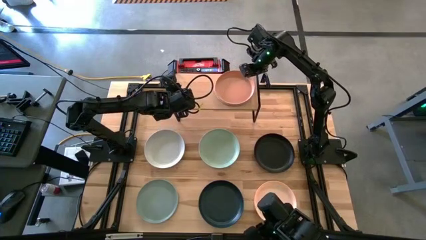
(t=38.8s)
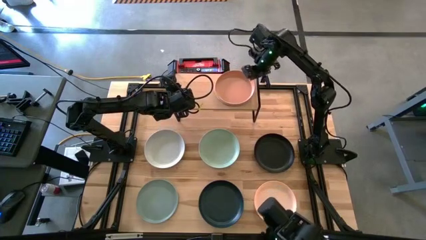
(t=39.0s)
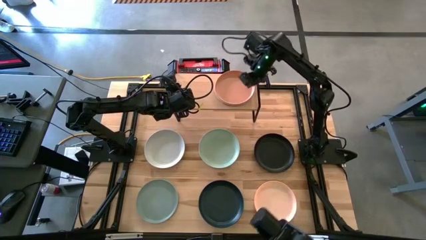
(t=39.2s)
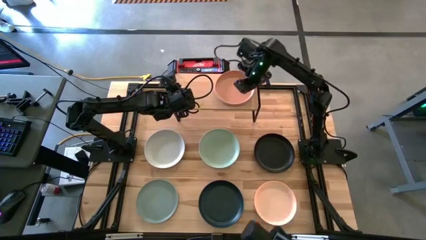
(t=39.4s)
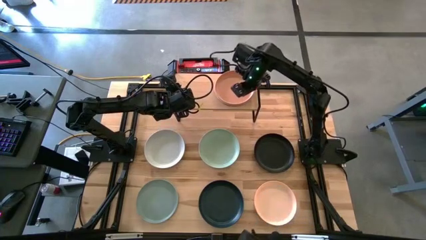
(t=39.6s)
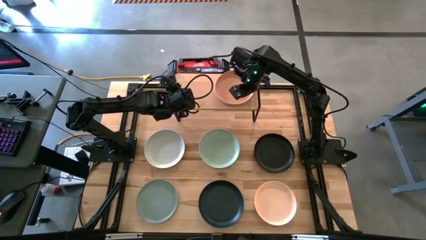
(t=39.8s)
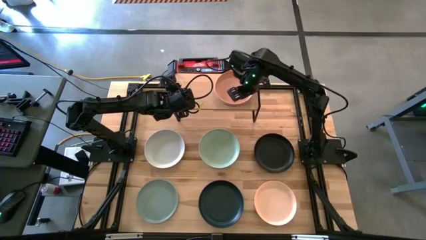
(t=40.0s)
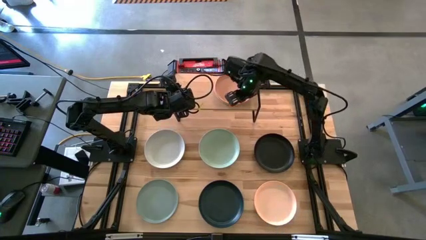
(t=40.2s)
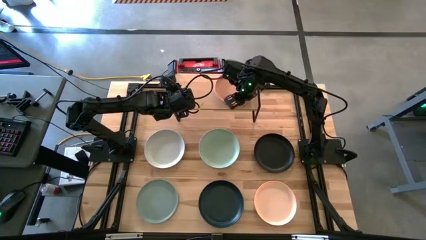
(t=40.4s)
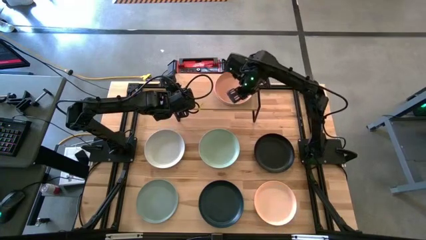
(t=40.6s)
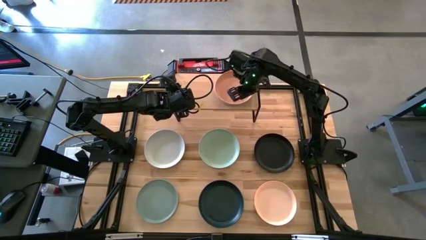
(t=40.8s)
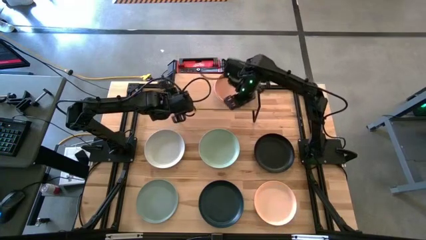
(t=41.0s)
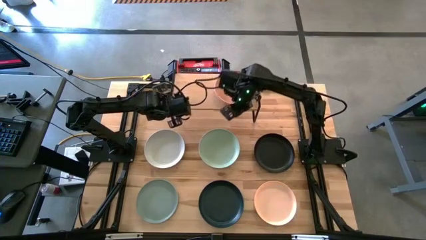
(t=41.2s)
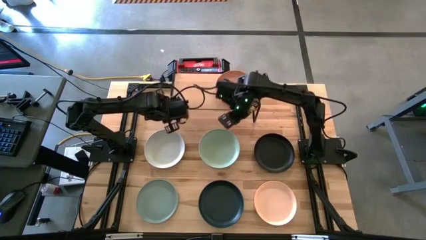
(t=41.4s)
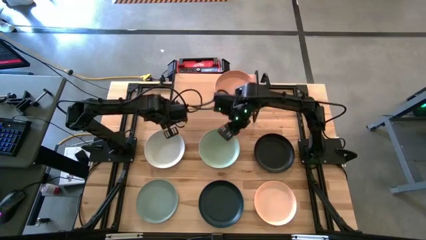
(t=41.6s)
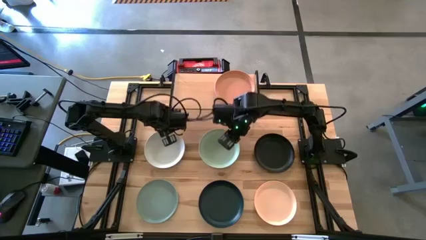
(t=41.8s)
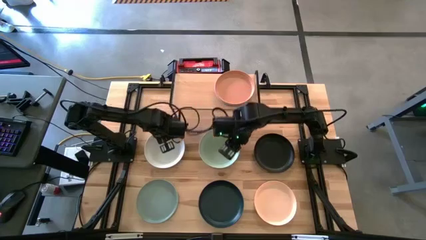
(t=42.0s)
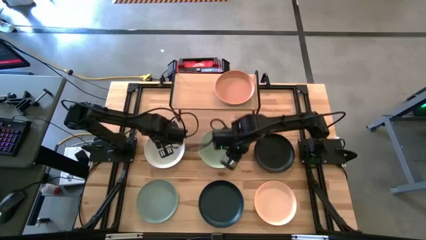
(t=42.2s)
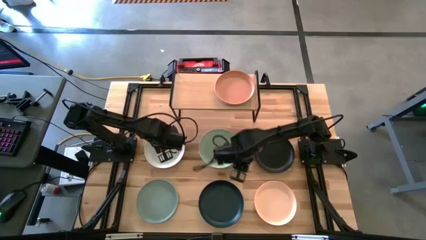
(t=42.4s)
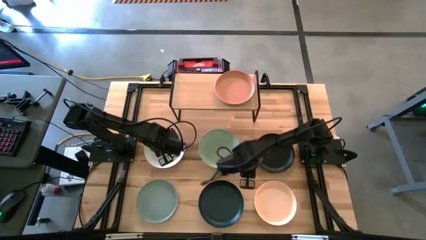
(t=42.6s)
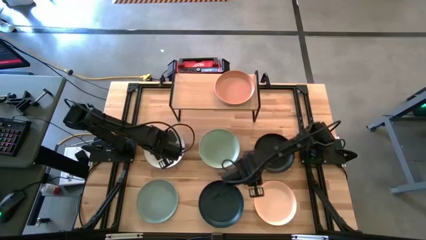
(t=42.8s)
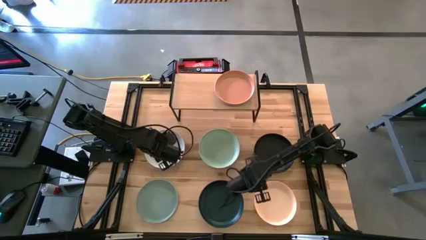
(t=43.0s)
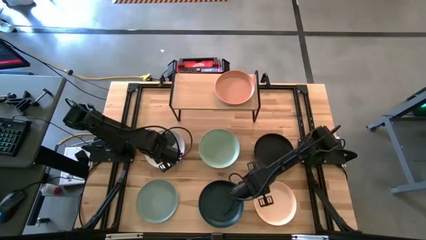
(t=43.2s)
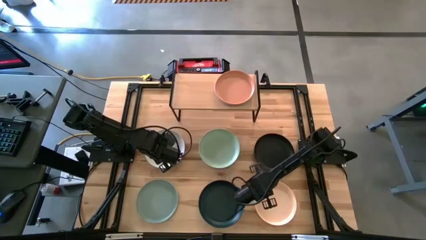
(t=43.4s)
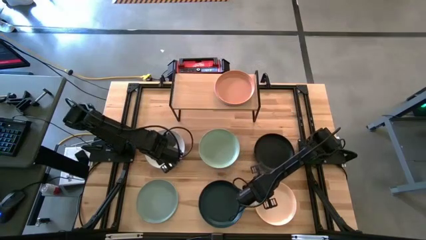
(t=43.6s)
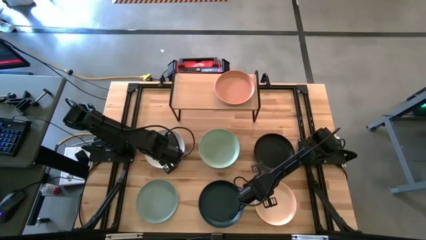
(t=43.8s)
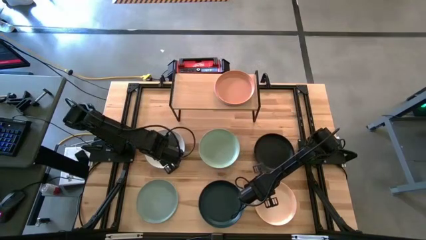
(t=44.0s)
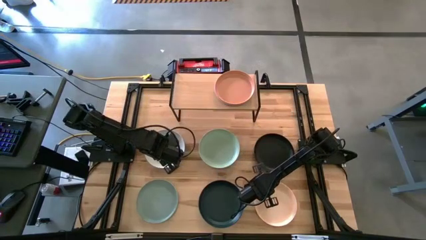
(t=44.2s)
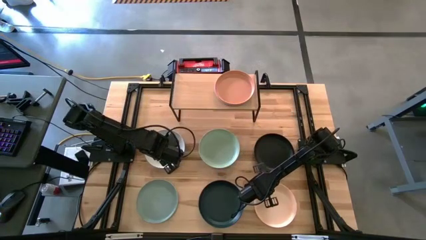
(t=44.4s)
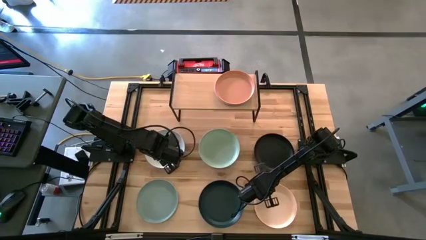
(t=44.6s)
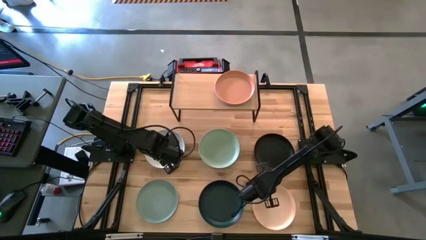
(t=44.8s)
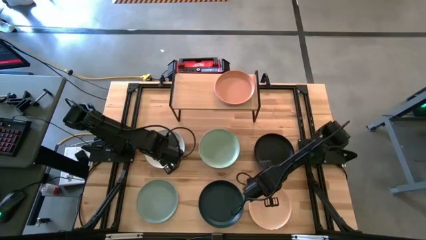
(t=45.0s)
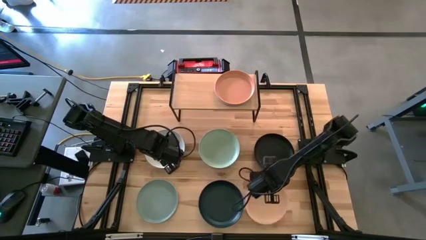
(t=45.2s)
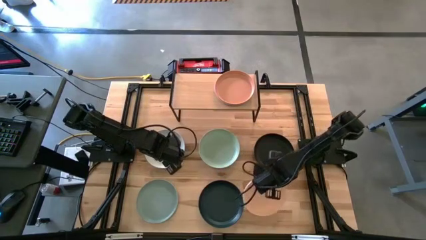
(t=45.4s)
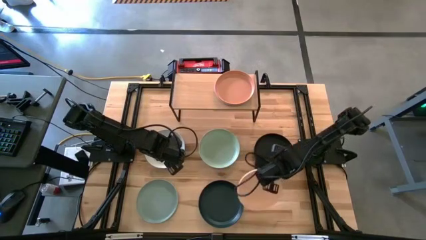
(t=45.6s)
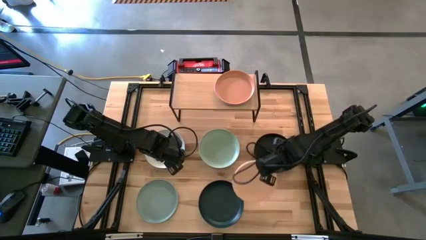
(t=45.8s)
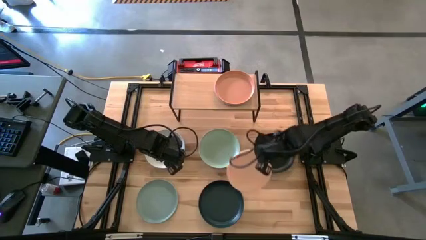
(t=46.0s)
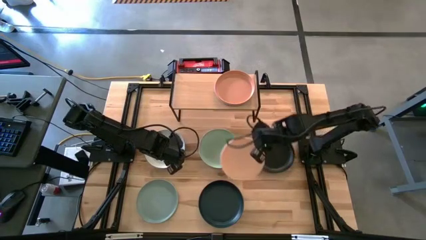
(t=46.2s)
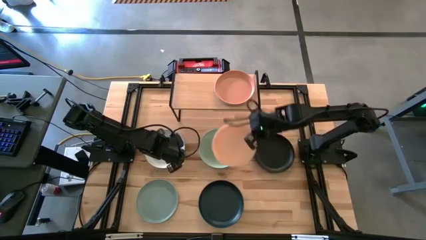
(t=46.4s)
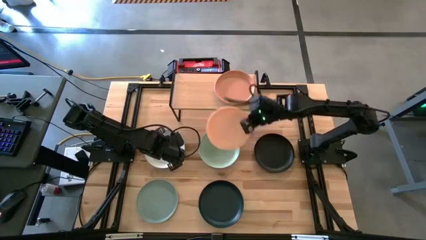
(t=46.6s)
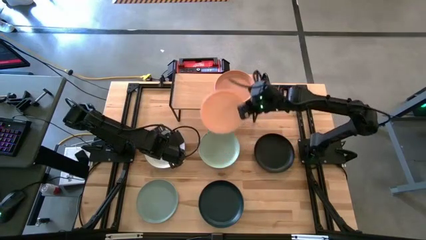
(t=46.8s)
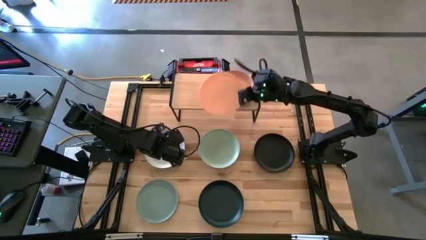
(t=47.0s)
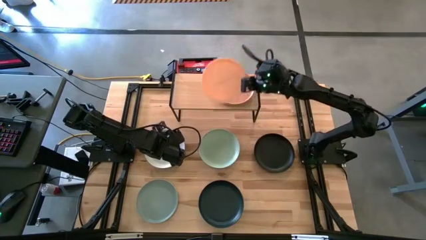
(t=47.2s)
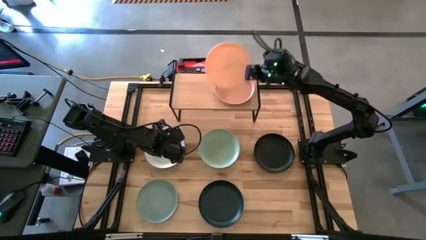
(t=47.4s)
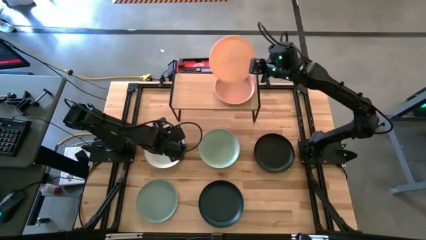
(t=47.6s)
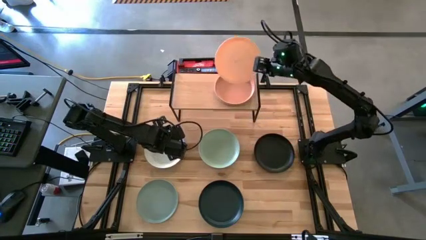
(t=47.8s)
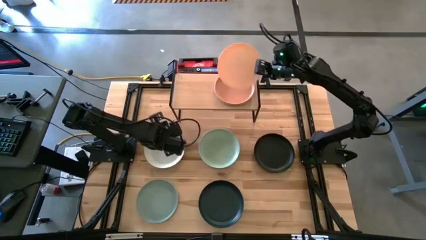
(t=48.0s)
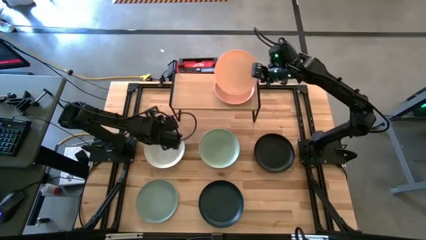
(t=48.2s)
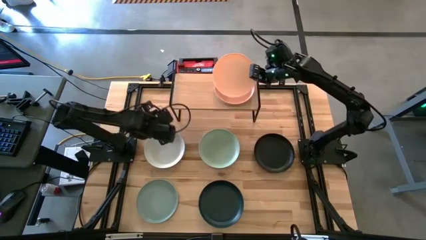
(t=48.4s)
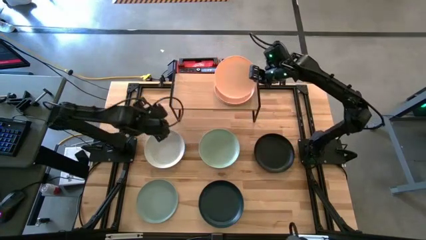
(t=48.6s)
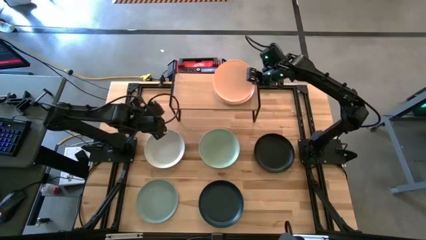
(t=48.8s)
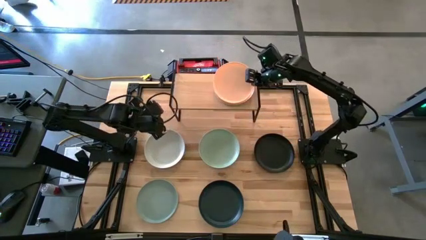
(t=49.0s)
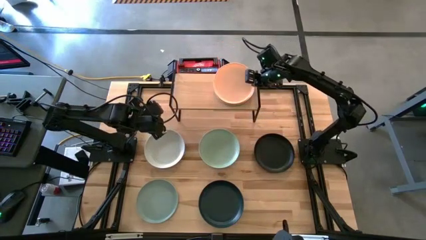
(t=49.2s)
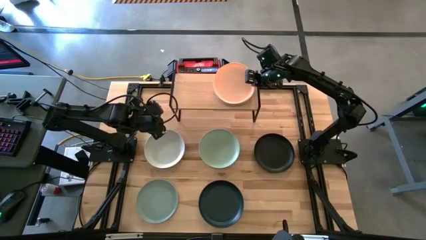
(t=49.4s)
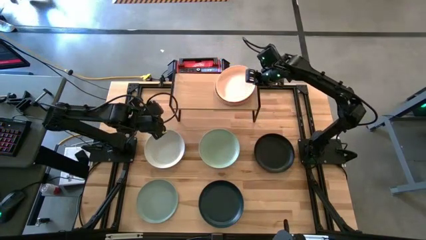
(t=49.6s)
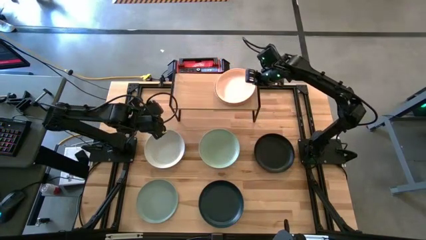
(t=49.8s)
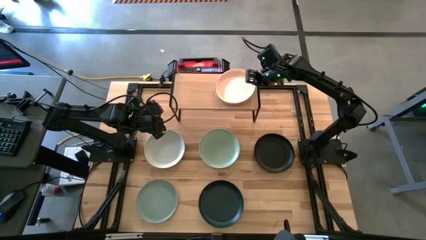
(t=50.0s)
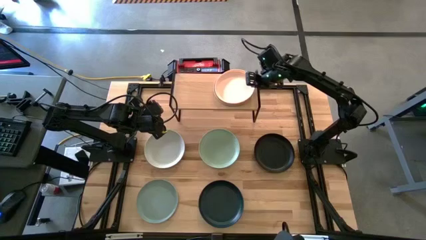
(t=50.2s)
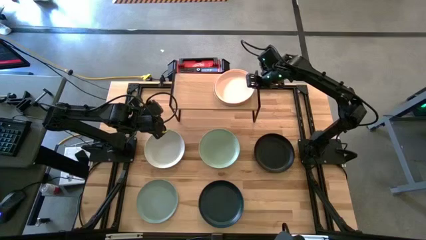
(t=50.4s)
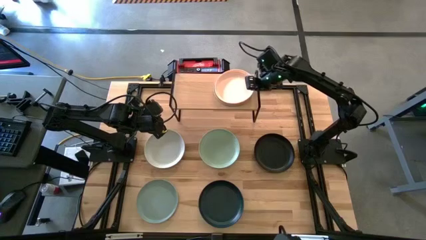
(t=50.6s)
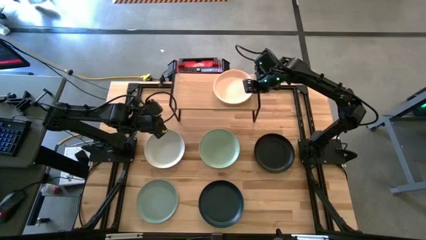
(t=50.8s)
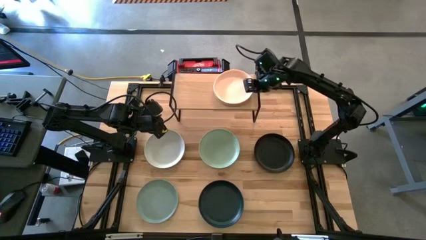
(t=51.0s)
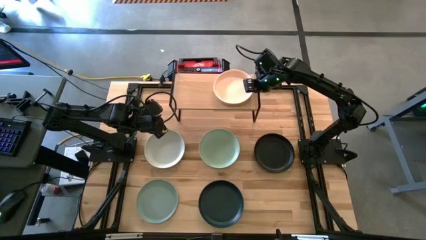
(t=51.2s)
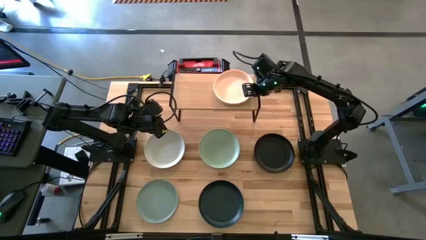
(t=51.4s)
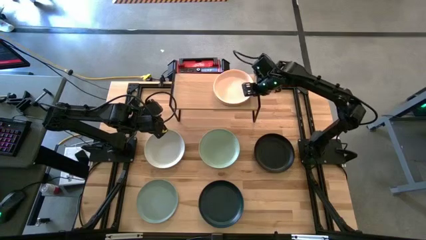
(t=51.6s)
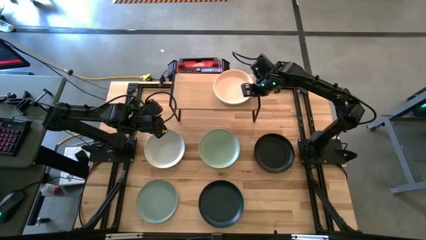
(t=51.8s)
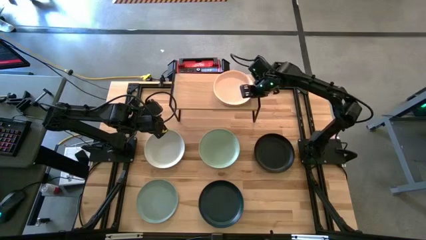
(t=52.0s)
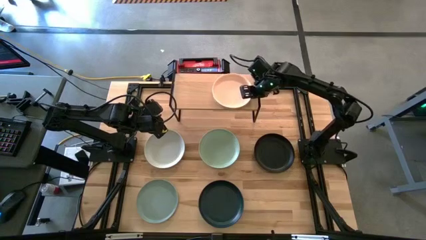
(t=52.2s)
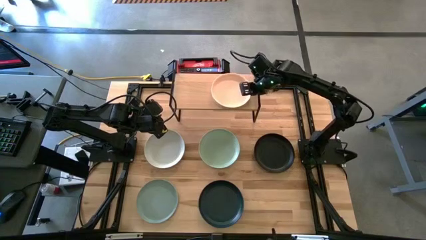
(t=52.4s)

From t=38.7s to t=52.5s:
Task: Place and stack plates onto a shelf
Stack the light orange plate on top of the orange plate on the shelf
